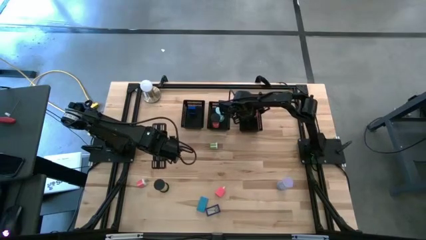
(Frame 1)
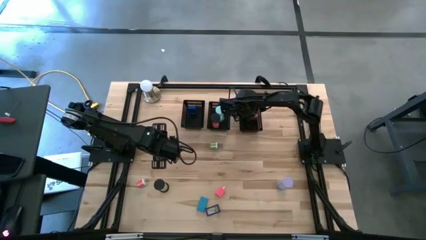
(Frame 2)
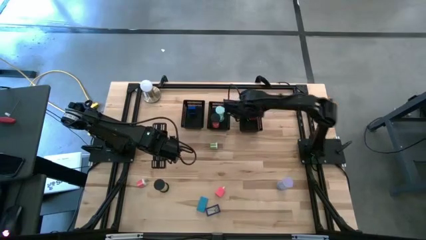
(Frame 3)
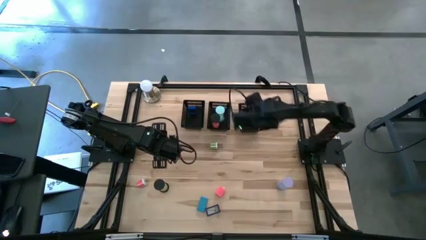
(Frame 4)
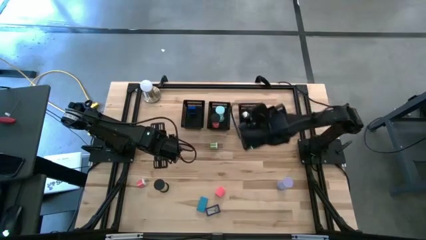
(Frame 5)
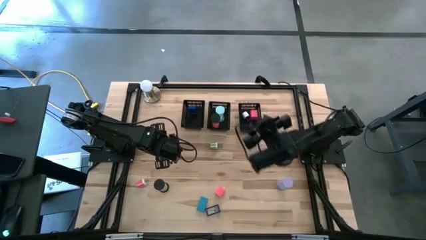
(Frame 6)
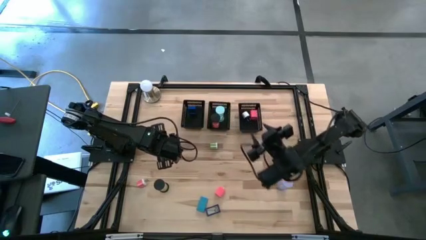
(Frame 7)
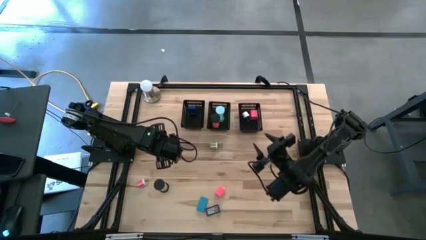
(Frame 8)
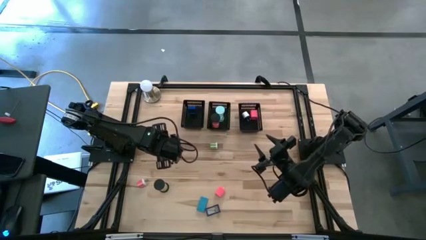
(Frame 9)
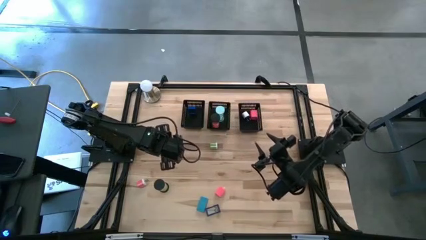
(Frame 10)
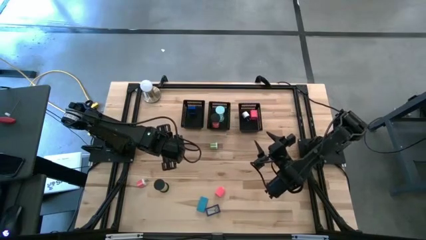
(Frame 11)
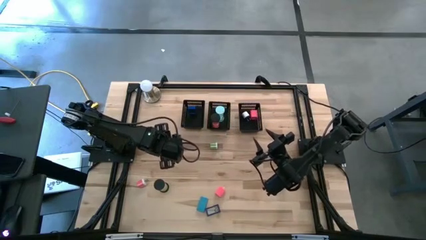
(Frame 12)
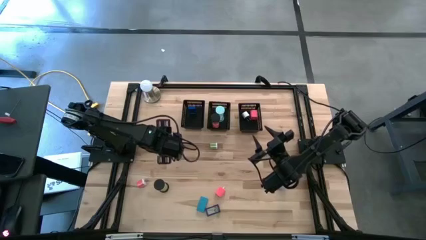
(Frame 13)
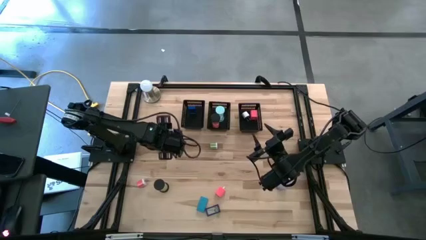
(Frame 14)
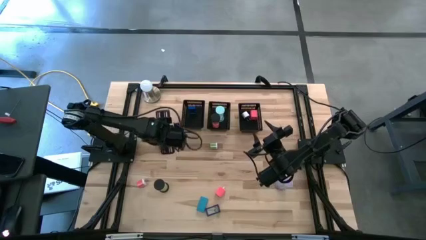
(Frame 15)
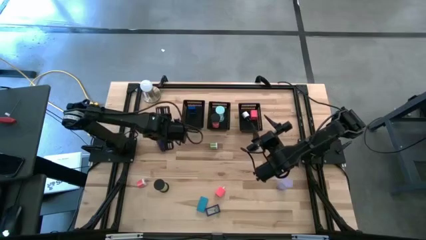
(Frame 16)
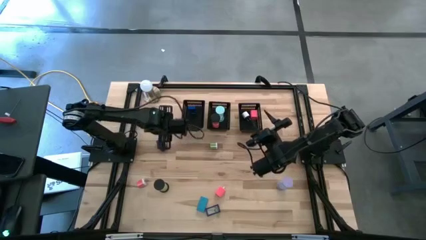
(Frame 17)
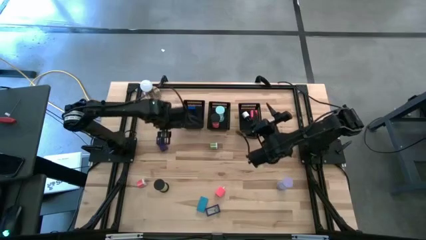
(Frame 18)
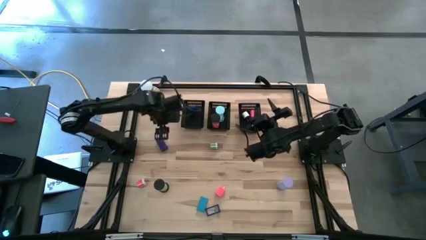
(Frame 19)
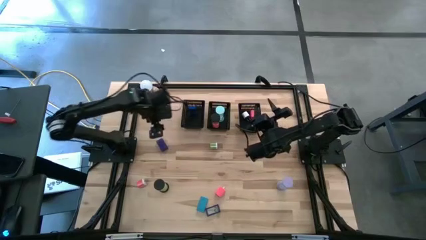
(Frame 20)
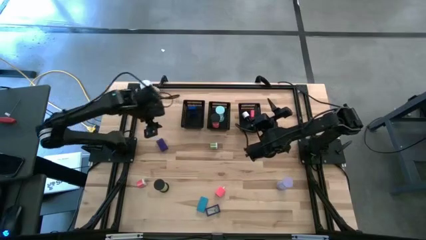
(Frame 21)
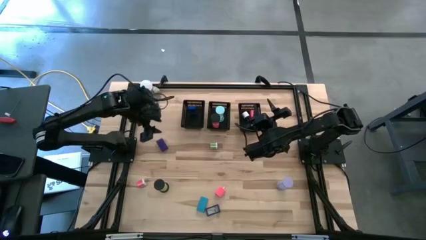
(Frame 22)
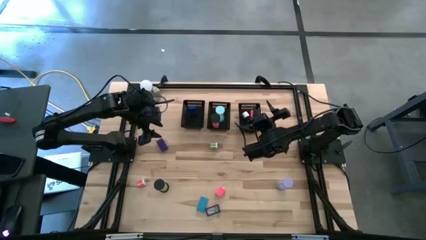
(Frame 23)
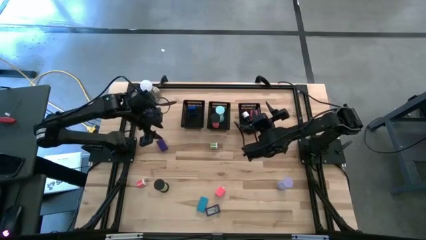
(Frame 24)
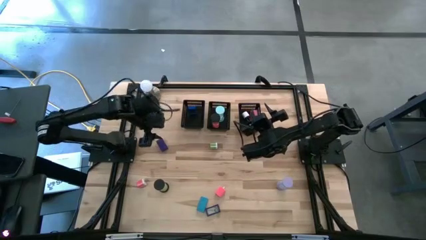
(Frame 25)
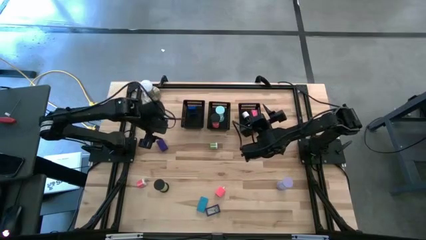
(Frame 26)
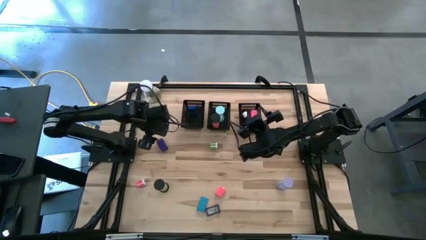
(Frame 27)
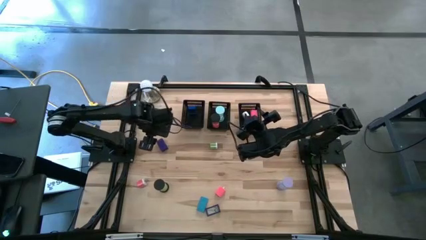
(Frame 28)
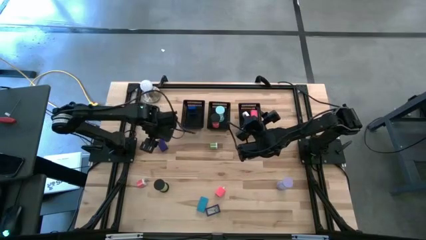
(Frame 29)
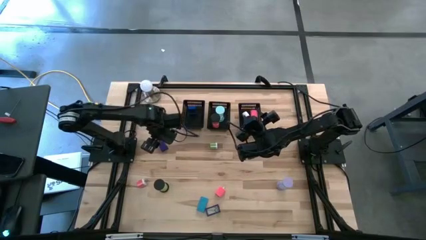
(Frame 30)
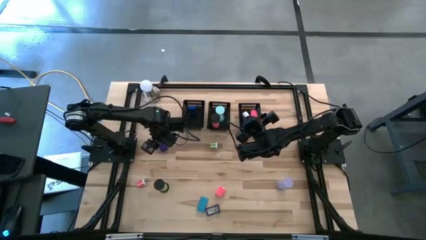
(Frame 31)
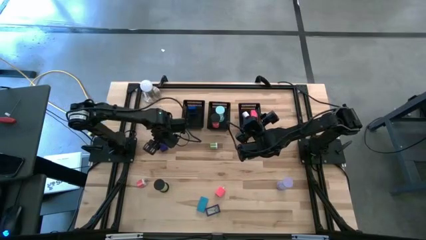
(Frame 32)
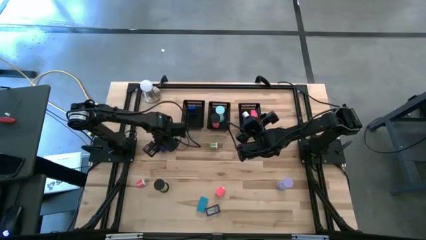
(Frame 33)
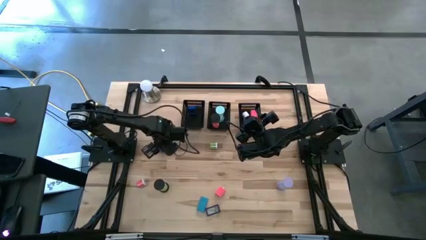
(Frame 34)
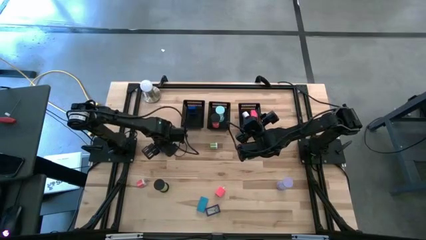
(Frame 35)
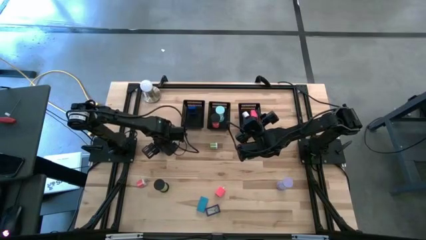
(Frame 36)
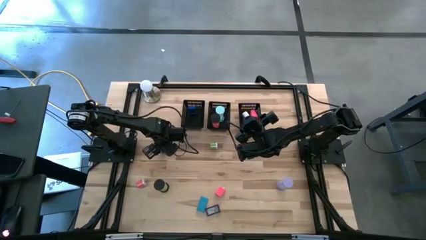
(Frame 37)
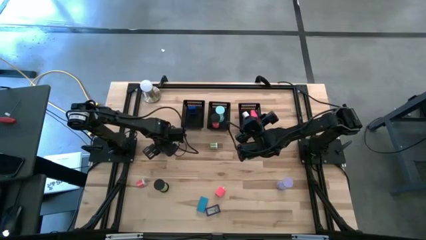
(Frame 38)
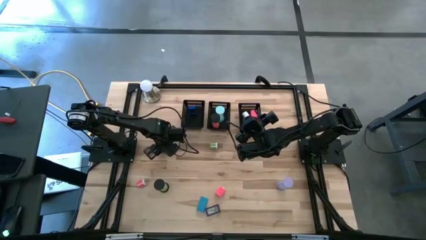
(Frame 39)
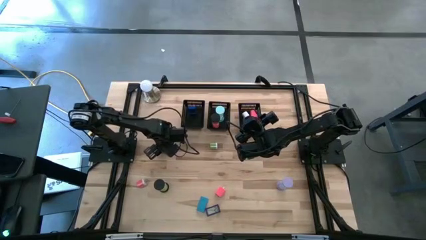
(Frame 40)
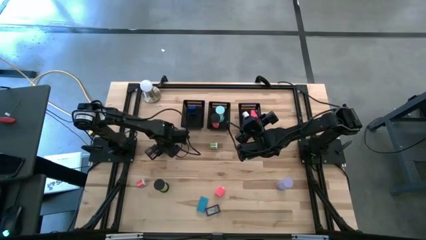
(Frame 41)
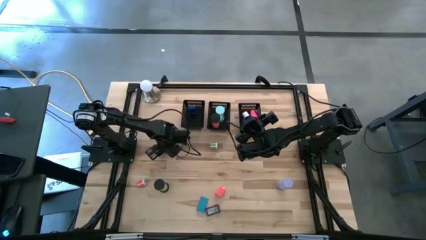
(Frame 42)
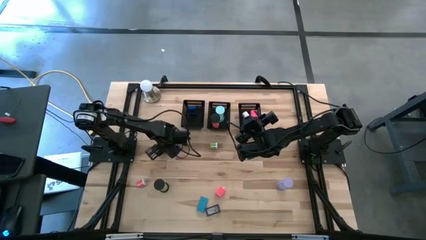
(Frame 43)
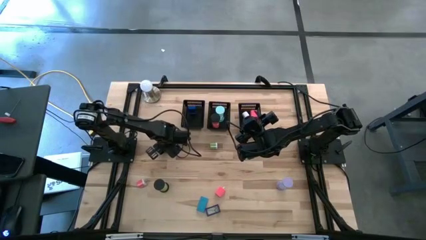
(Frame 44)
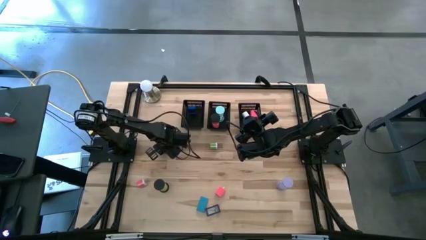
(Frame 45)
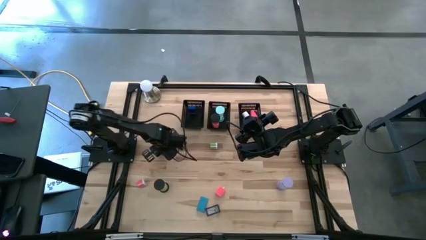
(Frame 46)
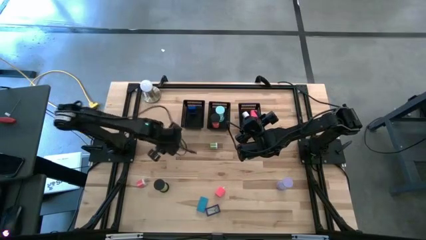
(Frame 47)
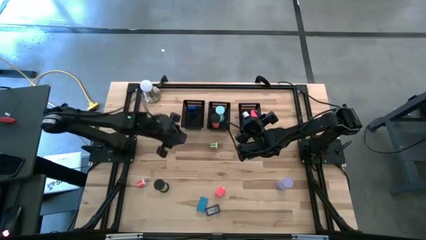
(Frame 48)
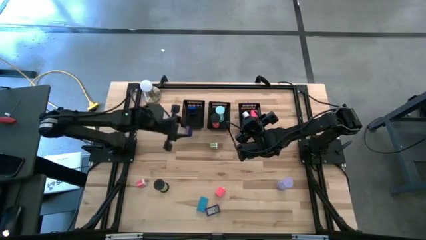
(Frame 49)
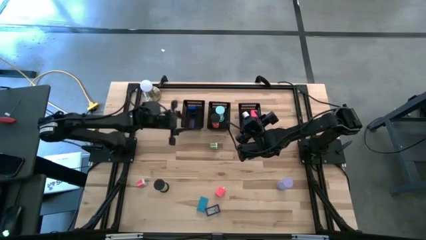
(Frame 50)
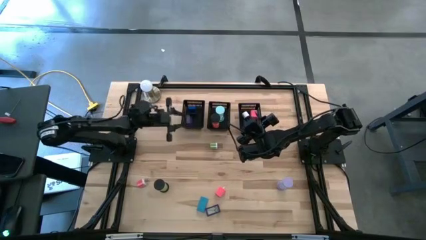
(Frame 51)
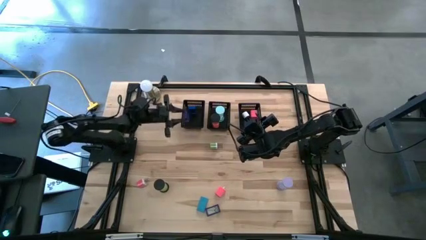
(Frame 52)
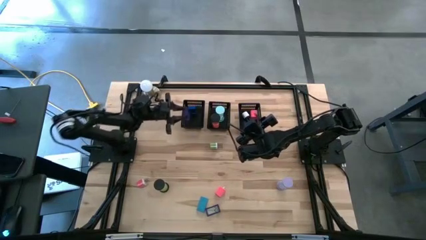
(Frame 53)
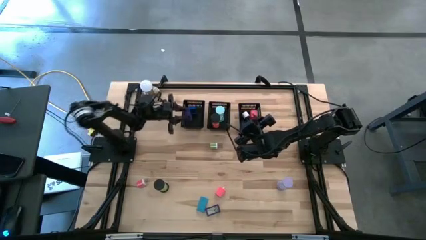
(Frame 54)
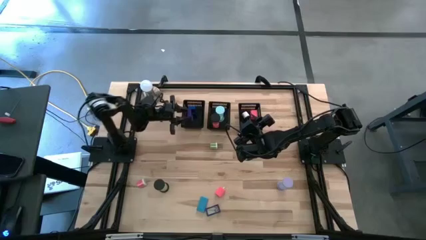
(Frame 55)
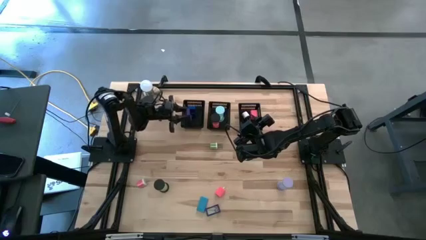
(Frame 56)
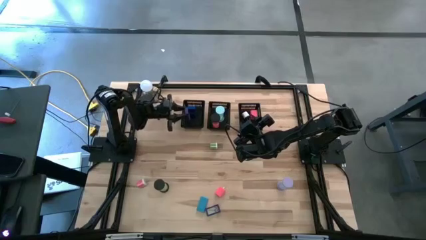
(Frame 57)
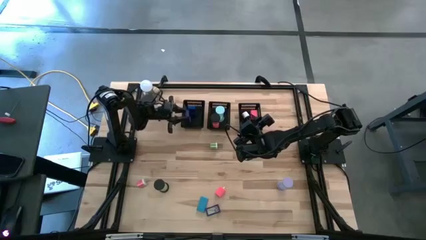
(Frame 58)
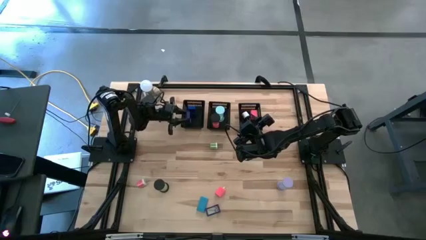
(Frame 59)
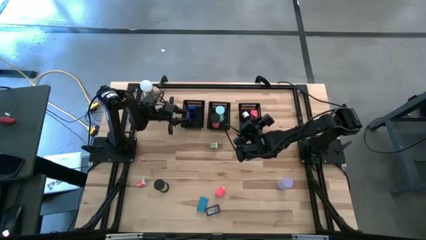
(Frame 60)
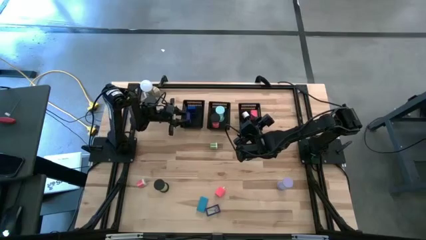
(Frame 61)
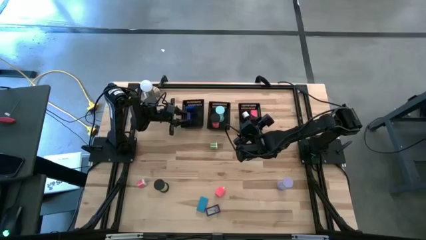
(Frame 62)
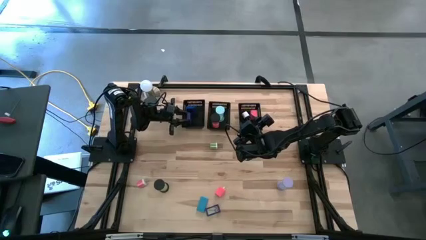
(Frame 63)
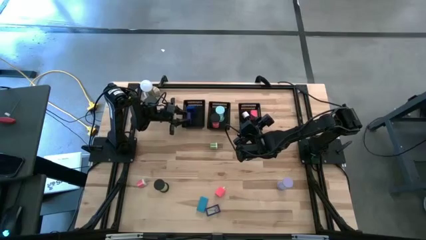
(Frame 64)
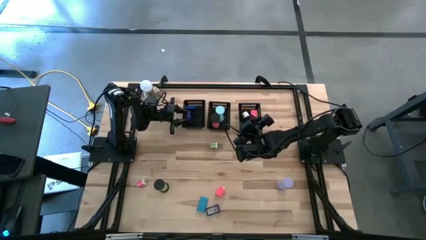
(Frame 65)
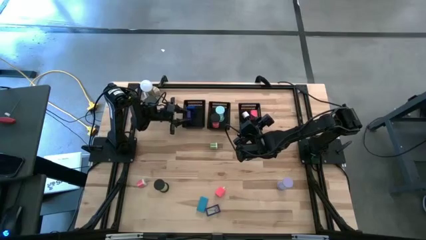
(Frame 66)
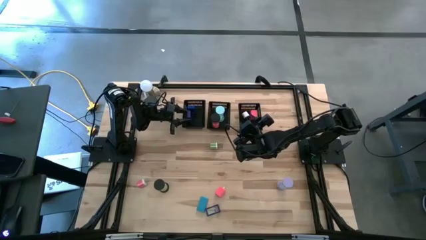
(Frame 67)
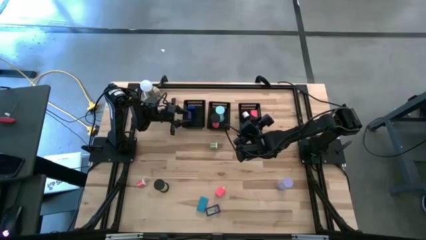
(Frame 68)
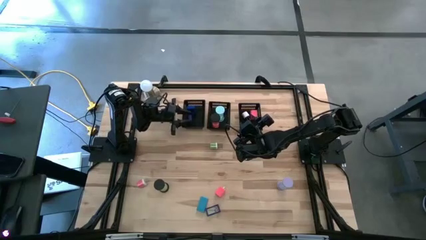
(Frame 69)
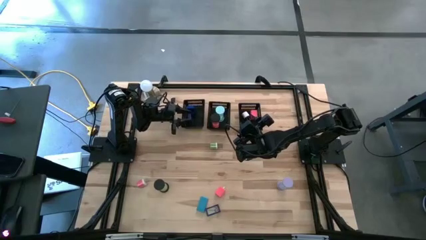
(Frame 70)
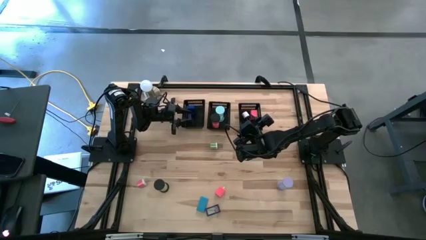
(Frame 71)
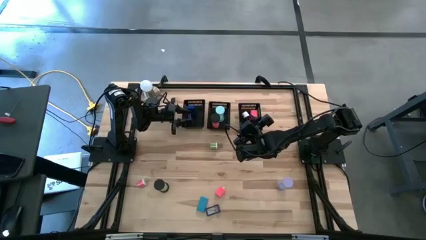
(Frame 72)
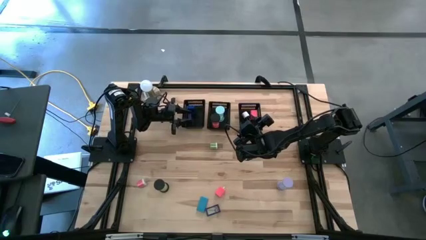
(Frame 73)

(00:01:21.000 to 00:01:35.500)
Task: Pick & Place Office items
Put the top dark blue digital clock into the left black bin

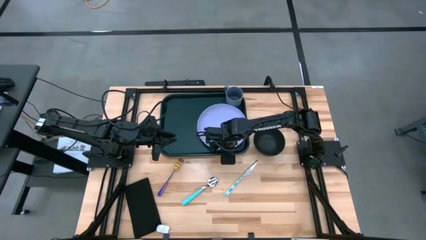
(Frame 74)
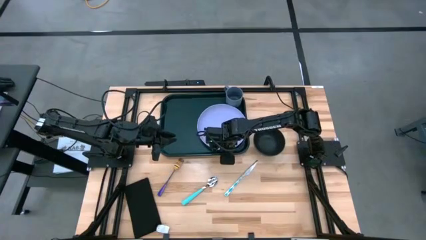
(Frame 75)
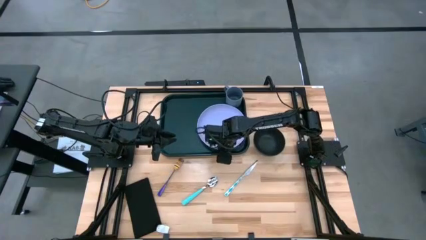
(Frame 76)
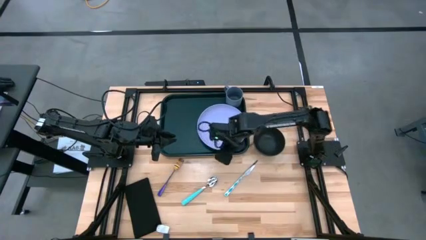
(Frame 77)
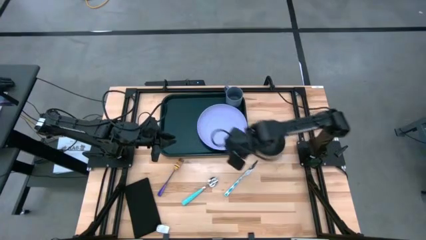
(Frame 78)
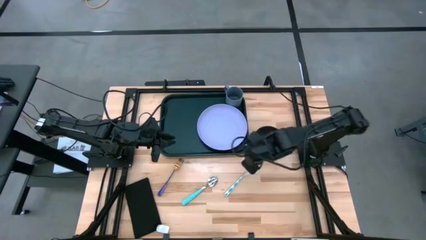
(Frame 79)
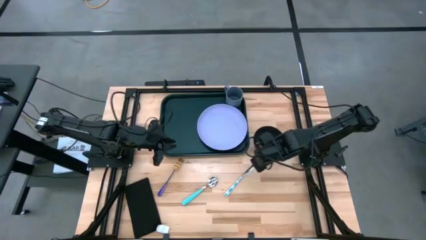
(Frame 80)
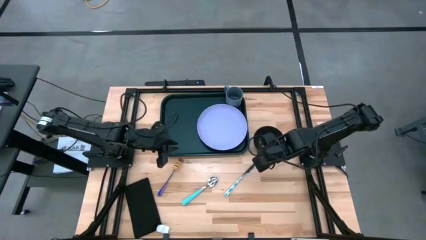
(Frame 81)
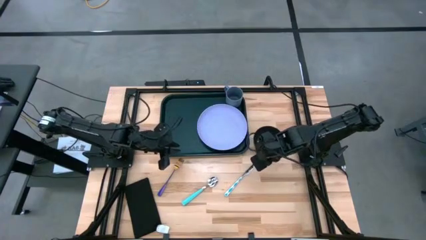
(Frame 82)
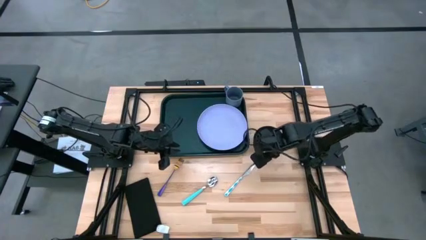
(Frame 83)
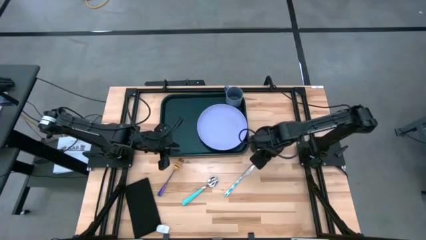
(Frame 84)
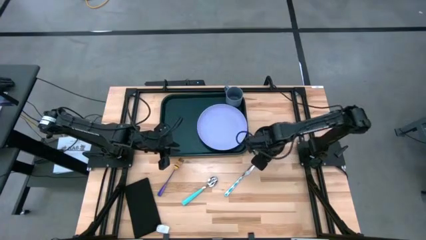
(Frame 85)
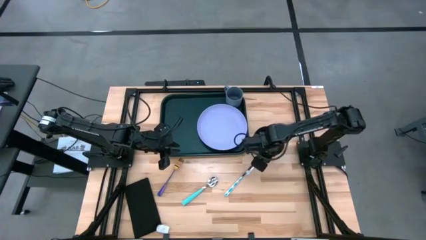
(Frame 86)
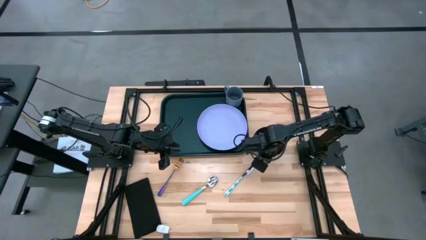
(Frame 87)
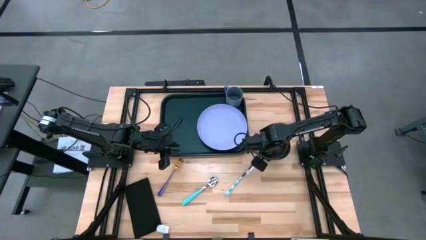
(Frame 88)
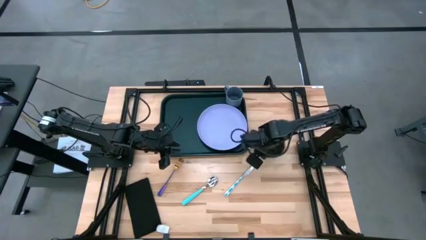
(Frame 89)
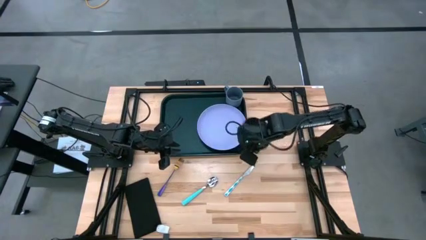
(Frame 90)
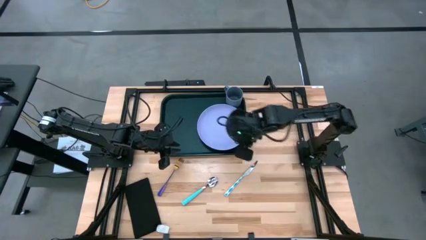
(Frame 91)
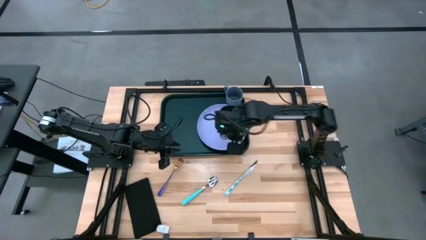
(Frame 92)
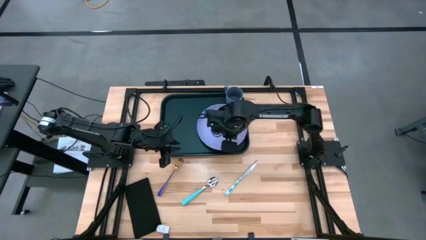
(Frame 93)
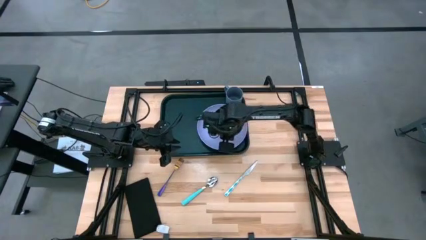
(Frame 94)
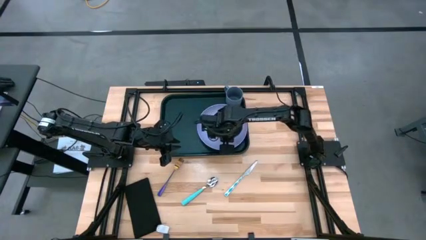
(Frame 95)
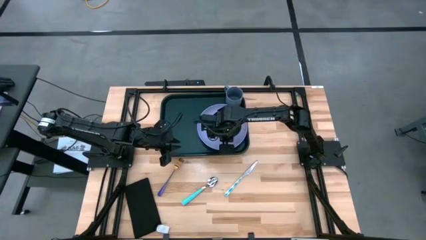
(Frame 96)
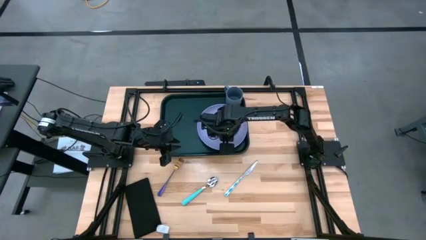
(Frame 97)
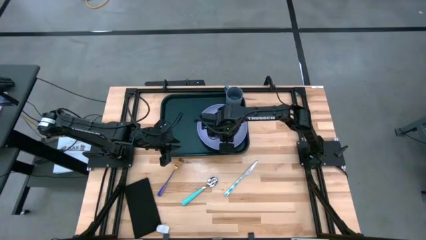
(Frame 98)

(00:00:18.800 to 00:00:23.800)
Task: Set up tray
Put the bowl on the plate on the serving tray
